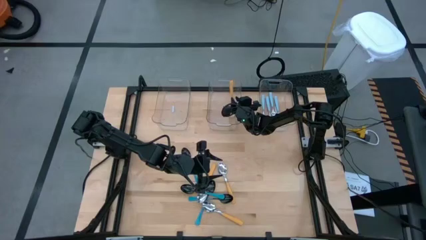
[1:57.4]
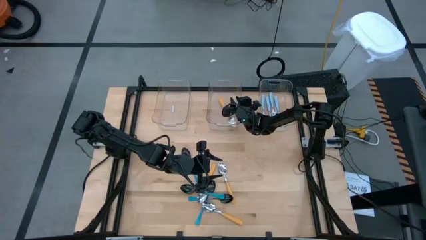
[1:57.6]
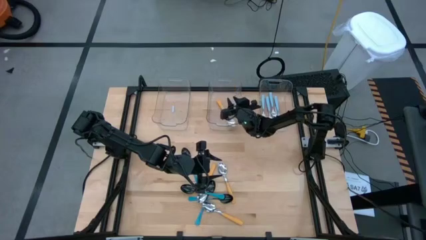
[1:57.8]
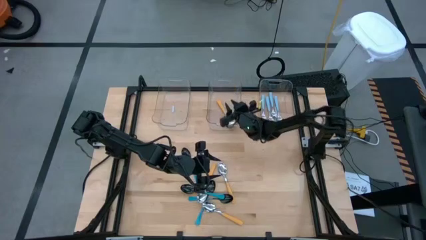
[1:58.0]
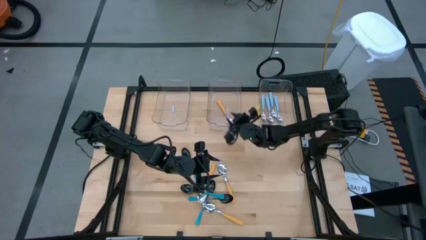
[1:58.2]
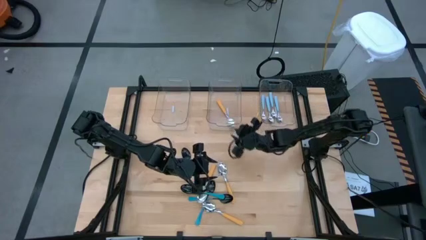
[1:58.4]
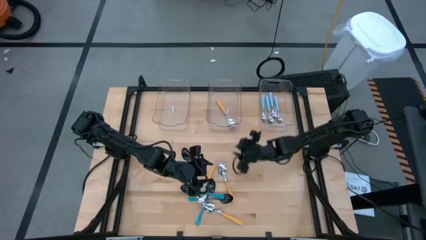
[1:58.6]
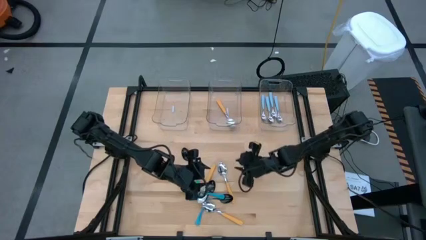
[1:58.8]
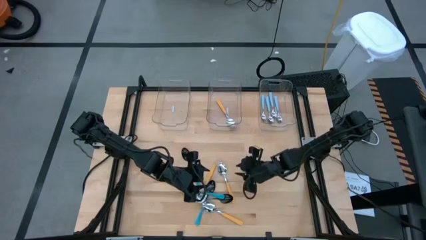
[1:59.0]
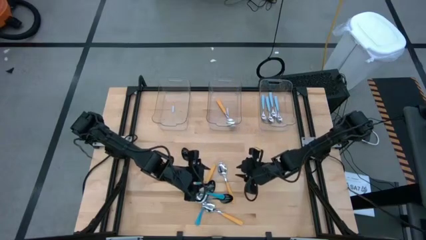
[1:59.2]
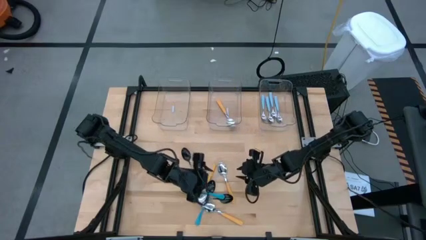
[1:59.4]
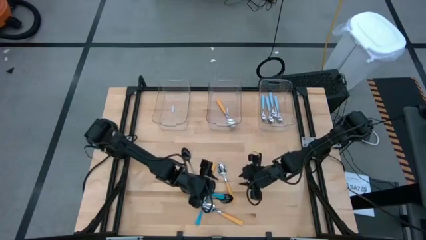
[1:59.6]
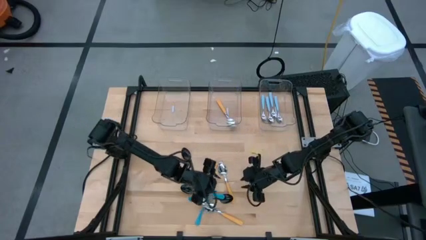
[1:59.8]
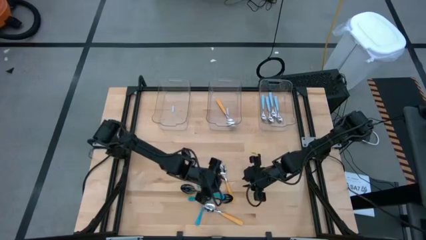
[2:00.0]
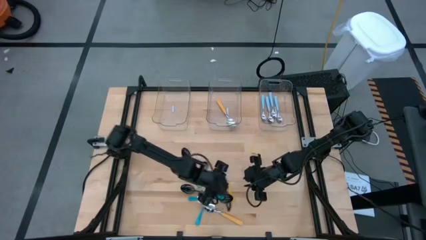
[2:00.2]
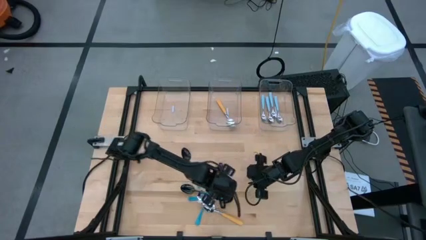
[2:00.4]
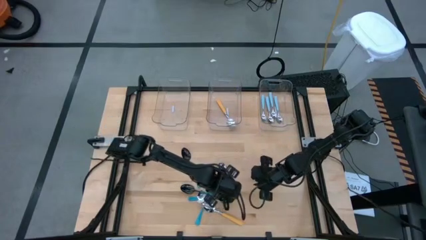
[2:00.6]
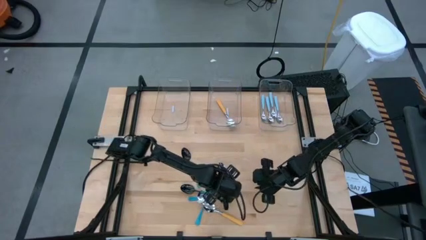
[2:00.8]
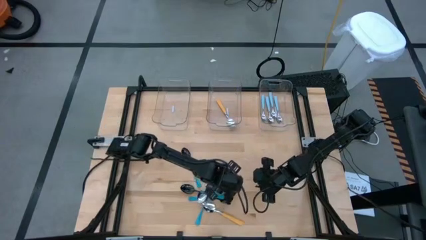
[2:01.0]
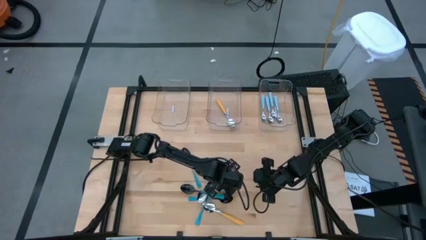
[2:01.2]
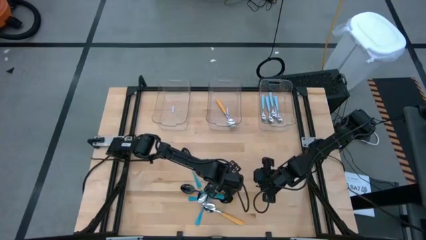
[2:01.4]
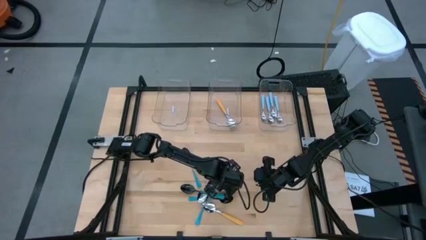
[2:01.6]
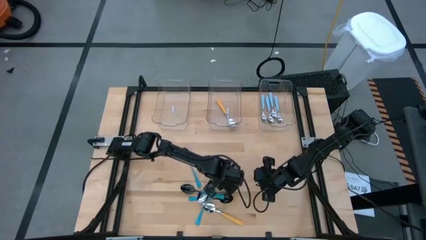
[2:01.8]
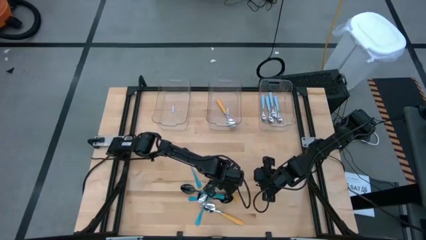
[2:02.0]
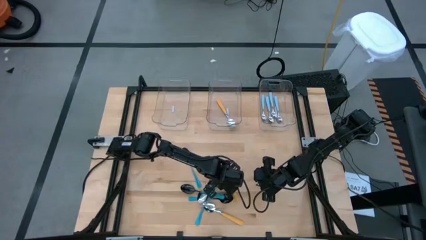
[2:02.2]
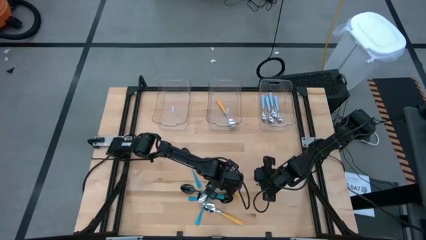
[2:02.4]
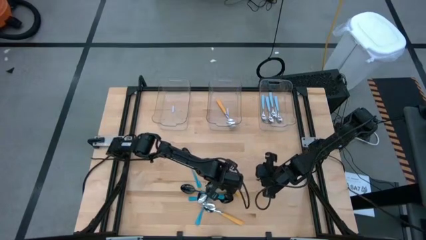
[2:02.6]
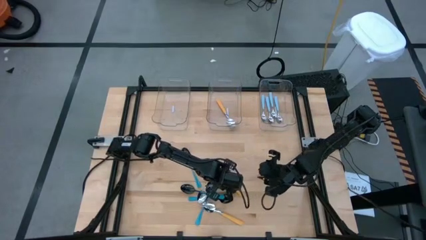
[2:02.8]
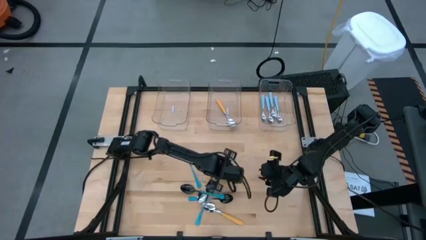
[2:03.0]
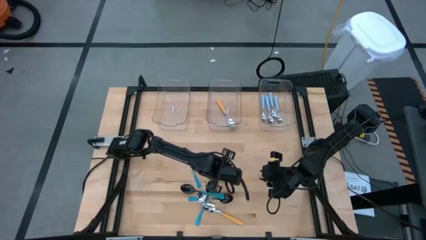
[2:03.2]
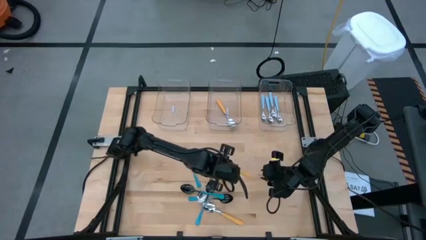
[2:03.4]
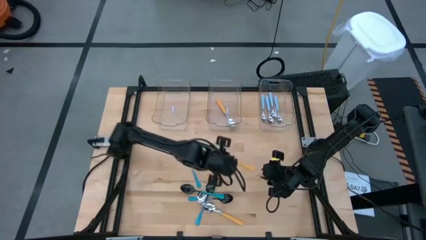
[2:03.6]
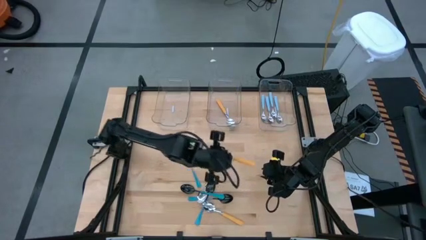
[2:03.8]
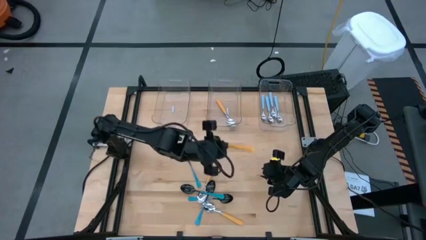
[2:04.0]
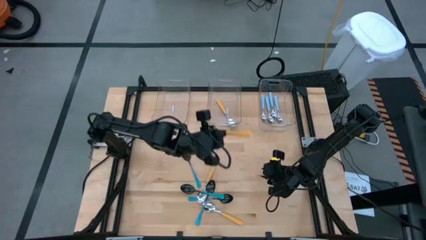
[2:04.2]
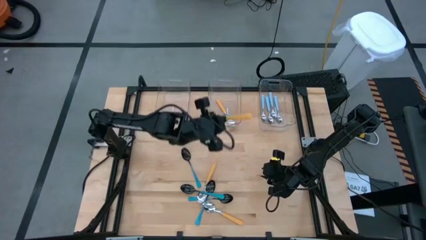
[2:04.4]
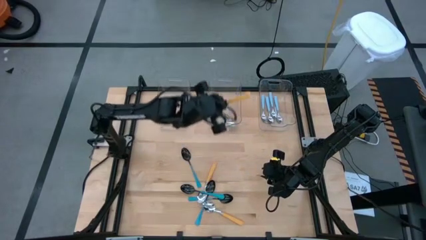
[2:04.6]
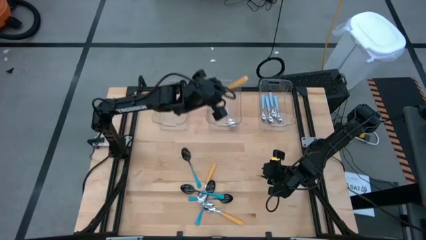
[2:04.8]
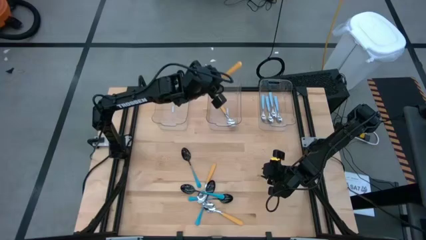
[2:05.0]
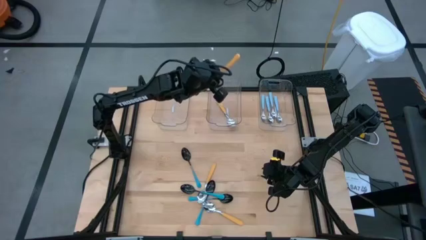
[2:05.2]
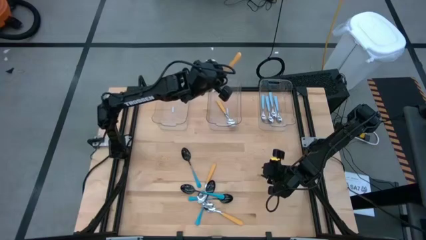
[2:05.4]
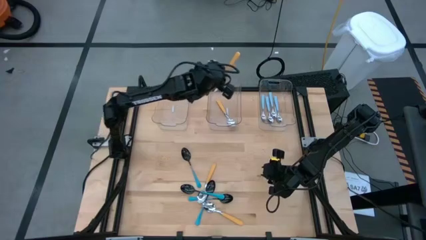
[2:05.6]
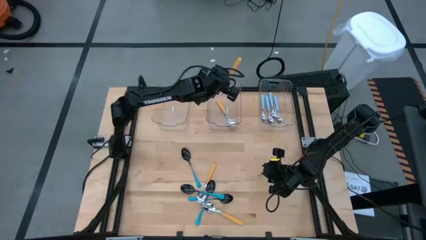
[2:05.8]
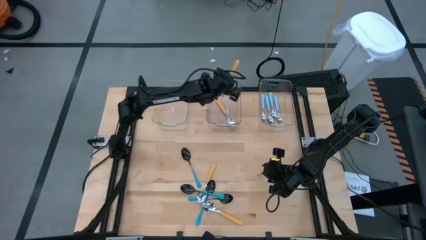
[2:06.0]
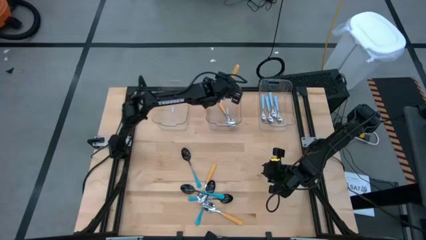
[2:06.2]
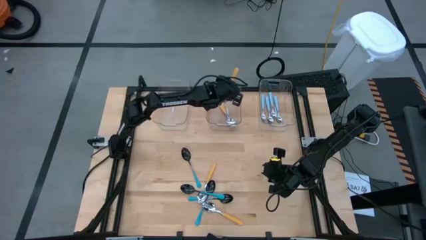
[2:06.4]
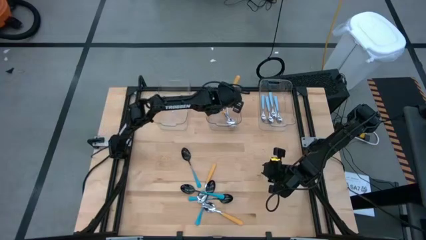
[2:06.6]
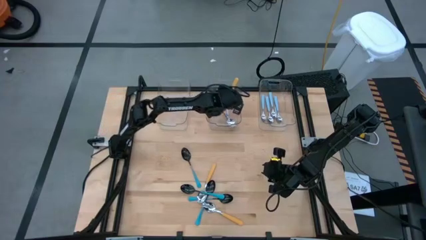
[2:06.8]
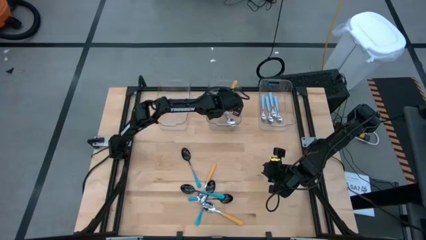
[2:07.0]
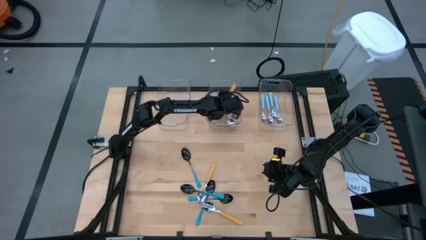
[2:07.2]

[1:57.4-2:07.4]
Task: Sort silverware by color (type)
Put the brown spoon into the middle transparent bin

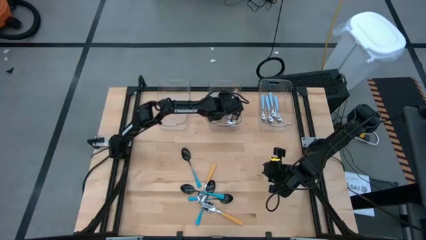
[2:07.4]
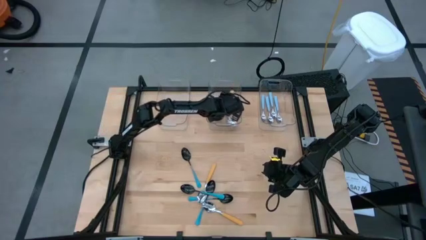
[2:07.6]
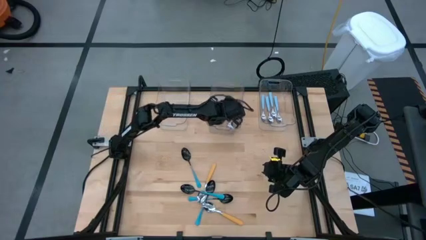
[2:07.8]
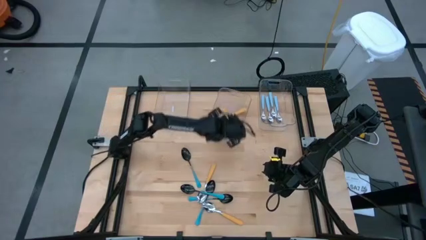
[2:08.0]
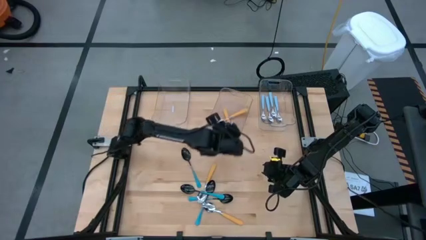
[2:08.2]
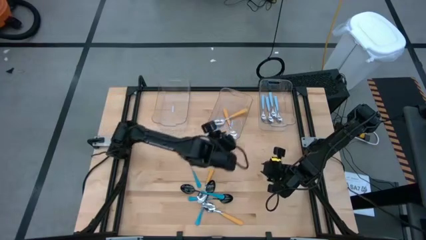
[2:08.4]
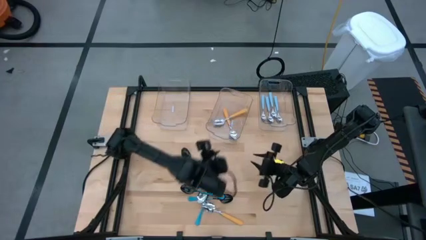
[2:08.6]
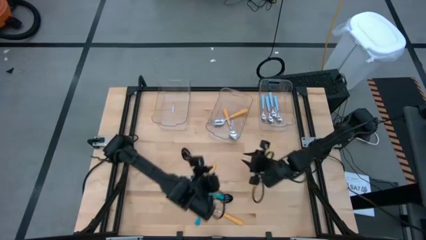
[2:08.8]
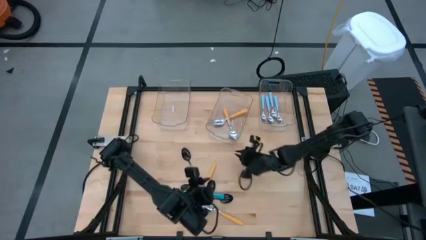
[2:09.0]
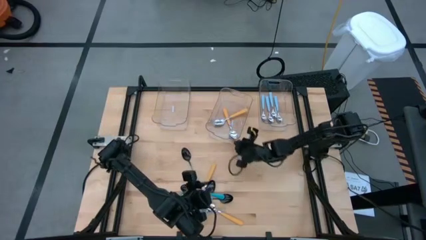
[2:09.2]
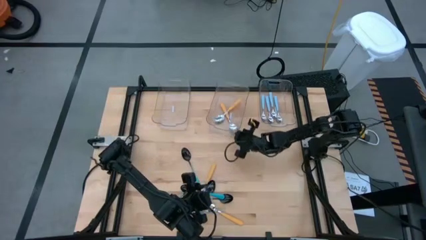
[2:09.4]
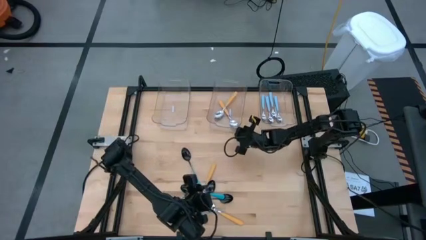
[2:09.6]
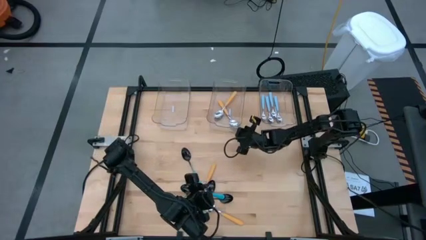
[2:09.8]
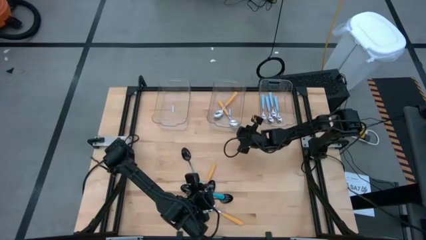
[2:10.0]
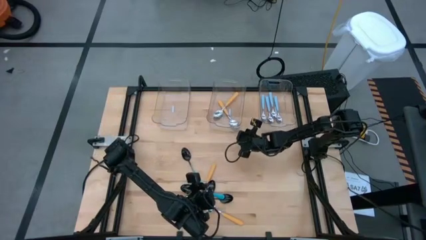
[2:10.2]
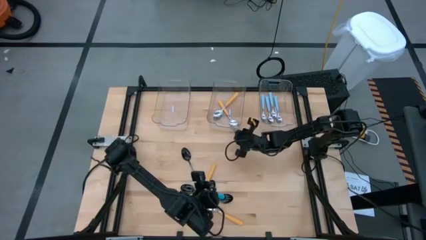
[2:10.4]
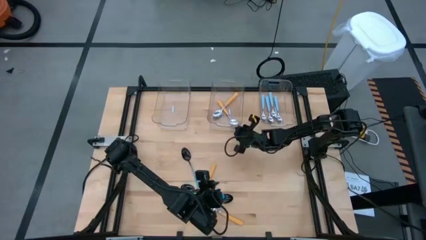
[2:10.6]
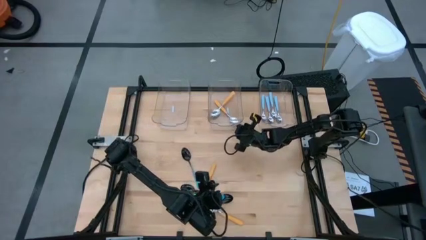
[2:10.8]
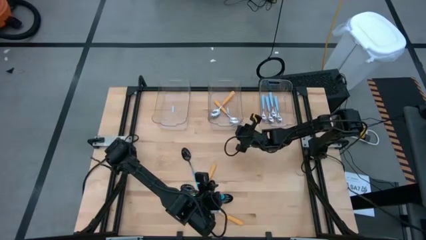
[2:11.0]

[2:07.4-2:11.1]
Adjust the middle transparent bin

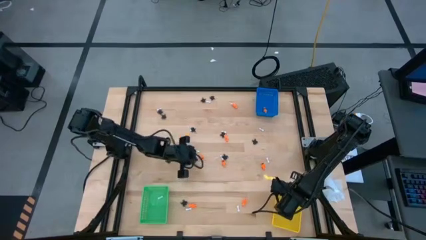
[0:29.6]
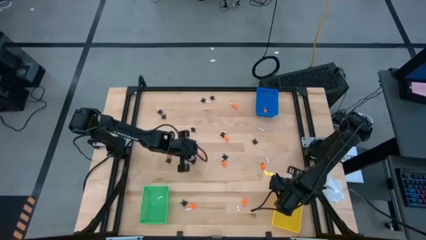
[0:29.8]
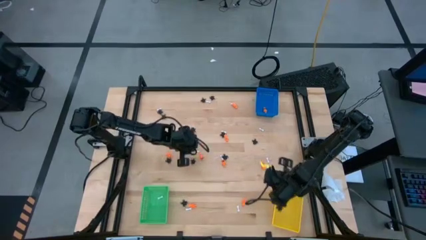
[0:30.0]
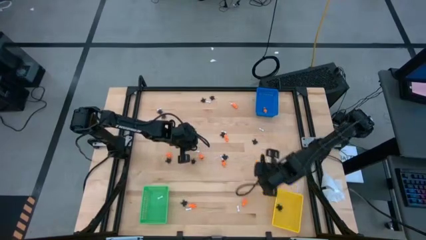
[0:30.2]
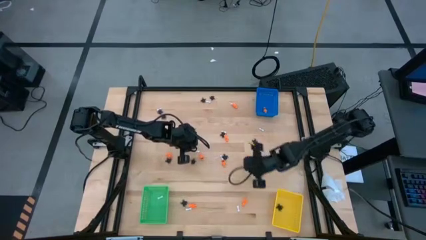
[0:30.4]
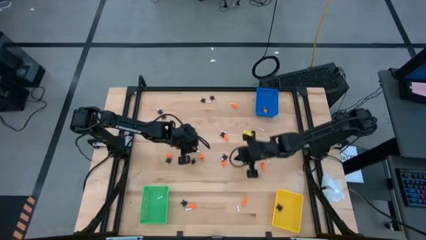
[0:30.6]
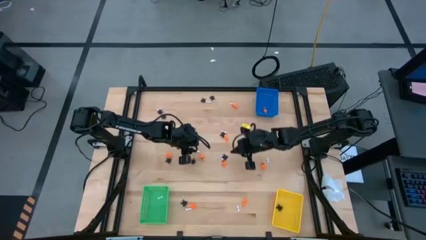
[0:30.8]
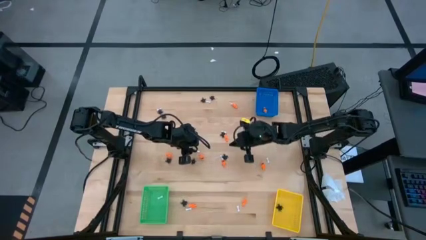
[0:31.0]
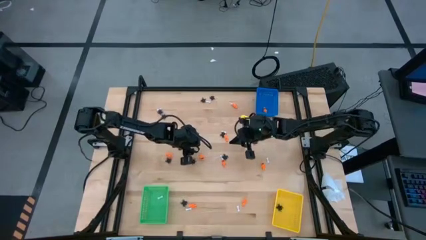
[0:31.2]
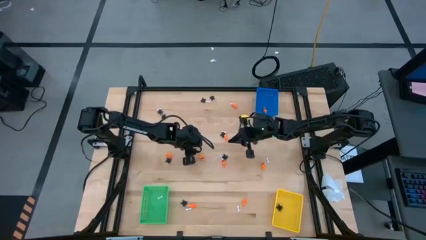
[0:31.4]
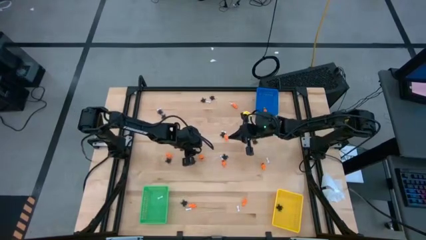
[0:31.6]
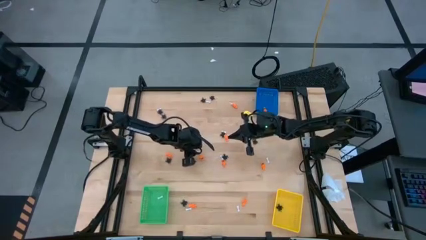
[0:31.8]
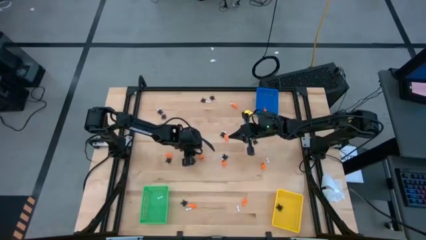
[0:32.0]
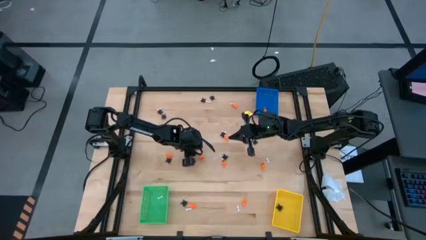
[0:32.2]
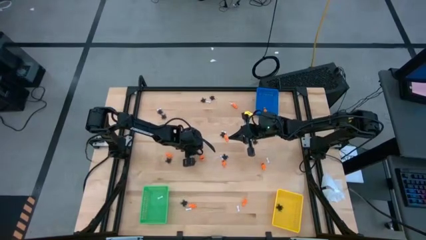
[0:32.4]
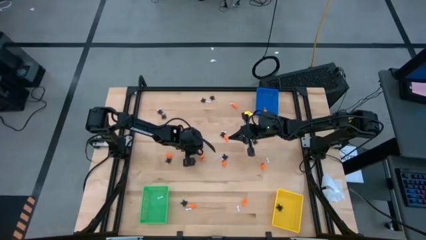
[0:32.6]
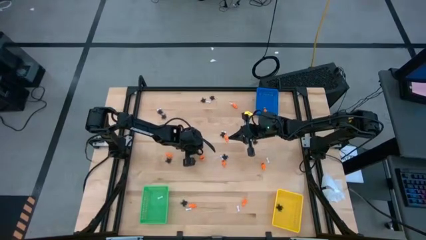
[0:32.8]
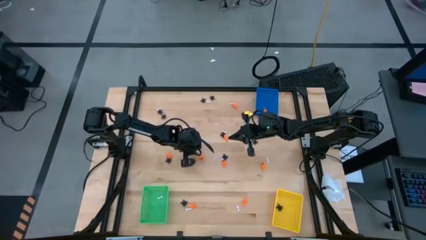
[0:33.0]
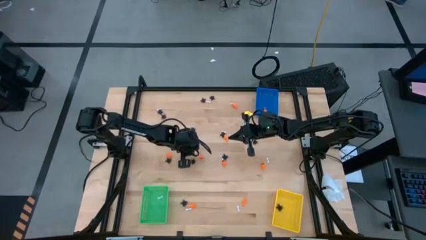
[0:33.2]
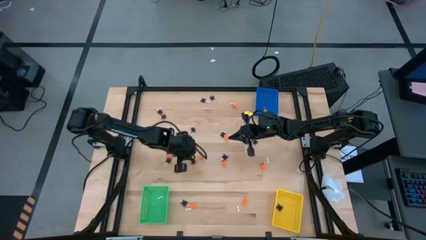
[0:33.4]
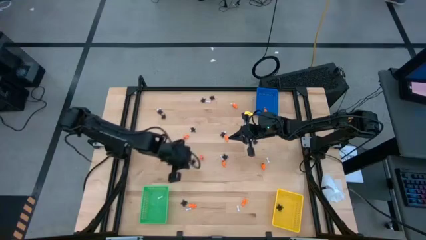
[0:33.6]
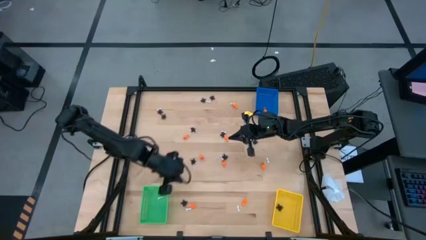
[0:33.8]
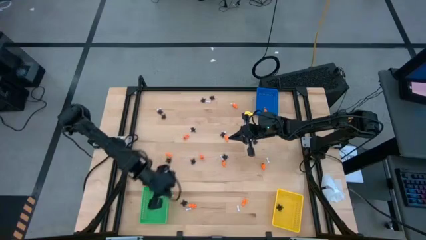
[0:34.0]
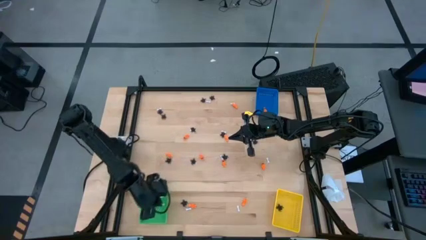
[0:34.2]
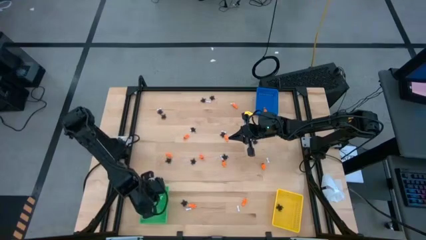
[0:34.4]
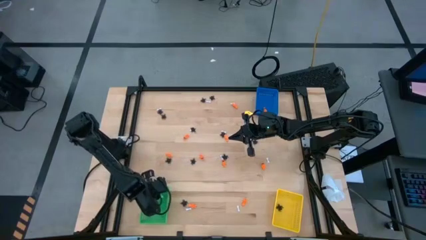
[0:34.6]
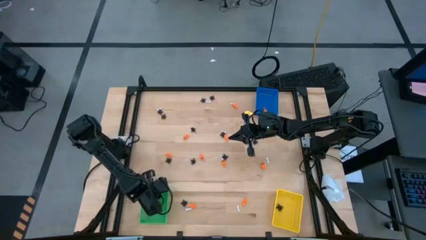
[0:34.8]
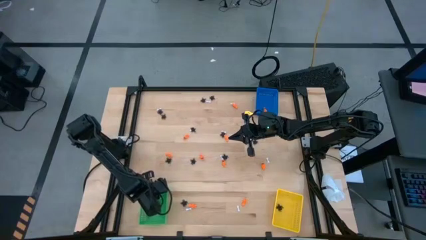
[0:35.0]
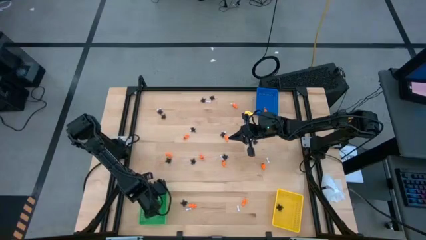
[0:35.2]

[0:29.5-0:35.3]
Task: Sort Halloween decoration
Put the white bone toy into the green bin
